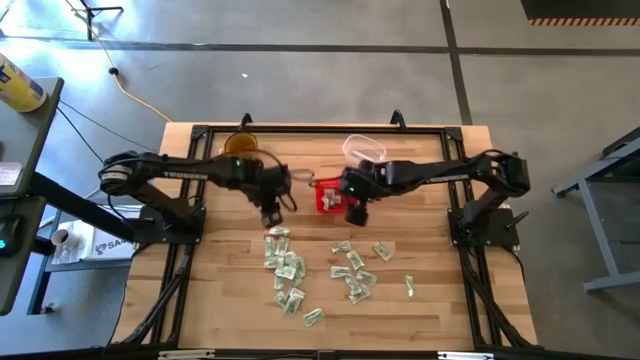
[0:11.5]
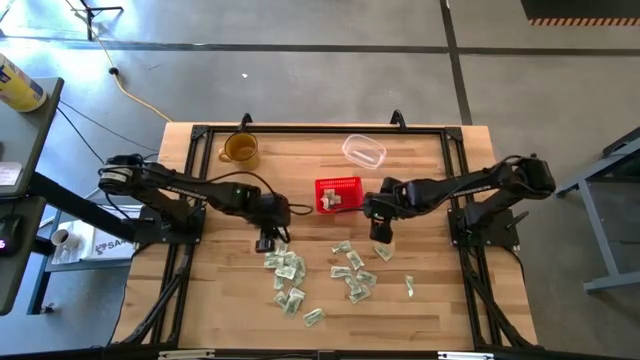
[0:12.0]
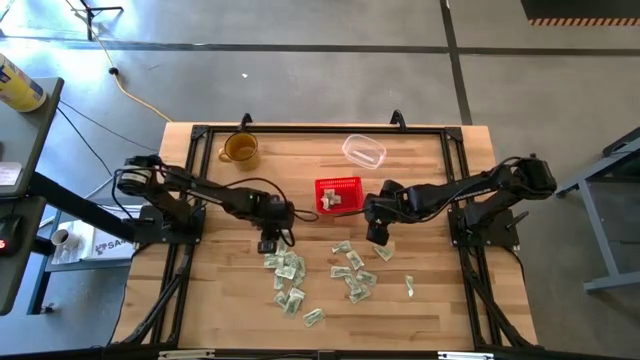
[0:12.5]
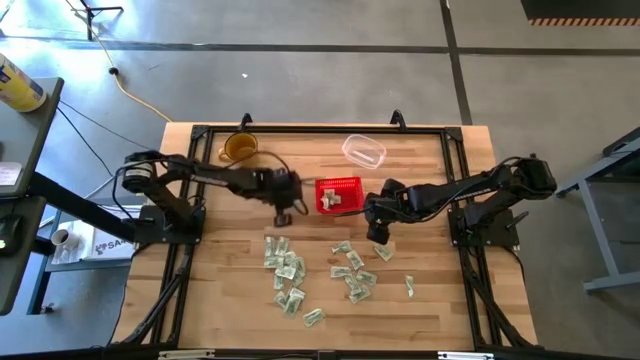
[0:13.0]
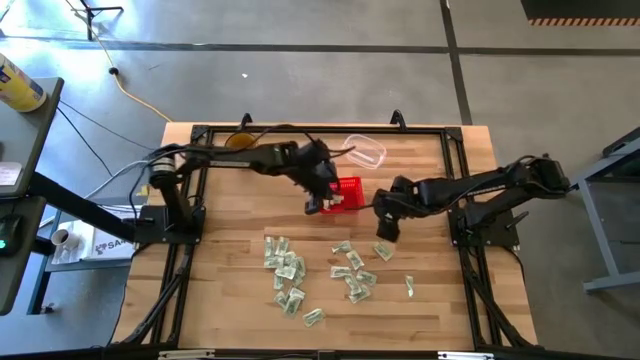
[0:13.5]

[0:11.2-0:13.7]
Task: Pick and place items into bin
Put the white packet into the red basket

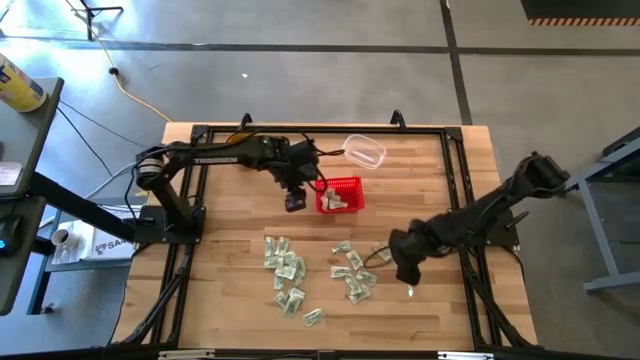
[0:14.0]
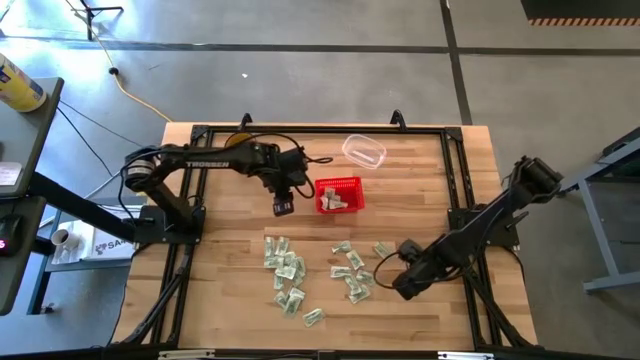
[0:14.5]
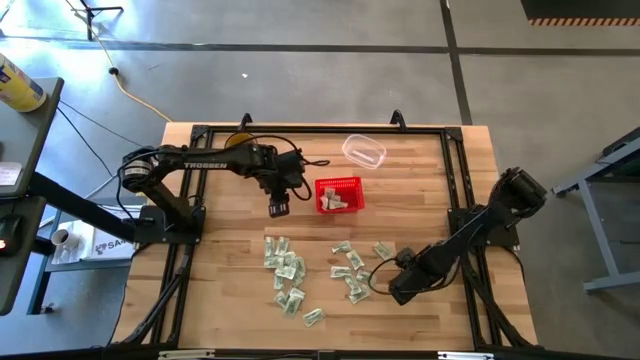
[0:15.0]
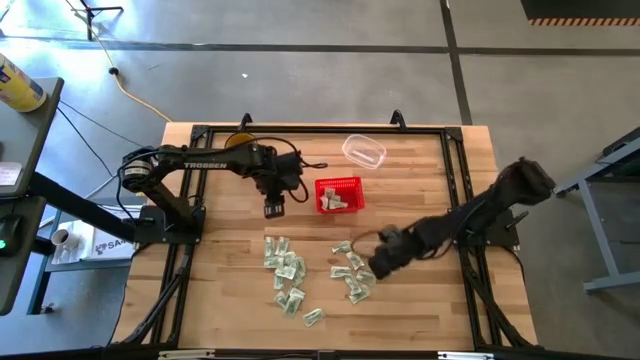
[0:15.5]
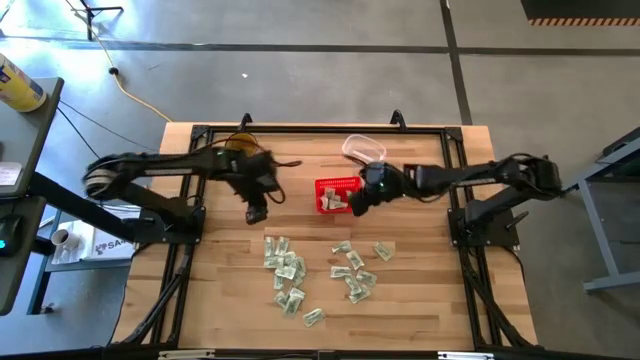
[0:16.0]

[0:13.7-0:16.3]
Put the white packet into the red basket

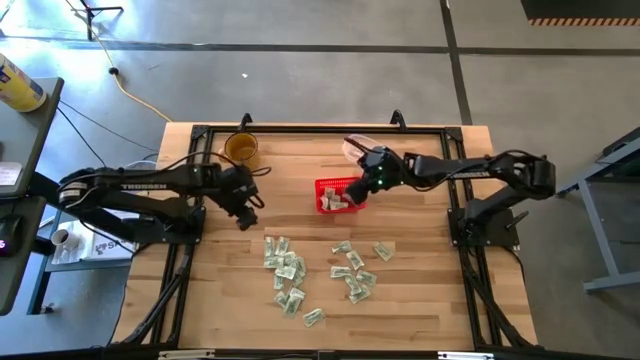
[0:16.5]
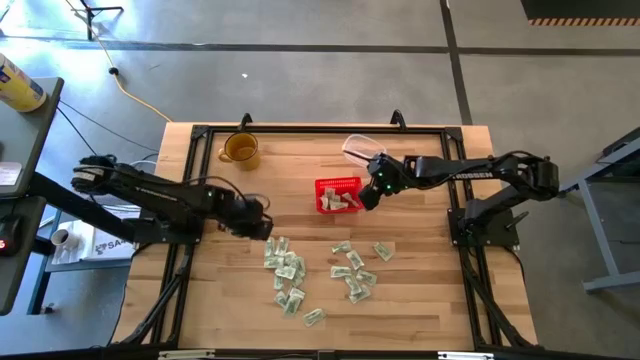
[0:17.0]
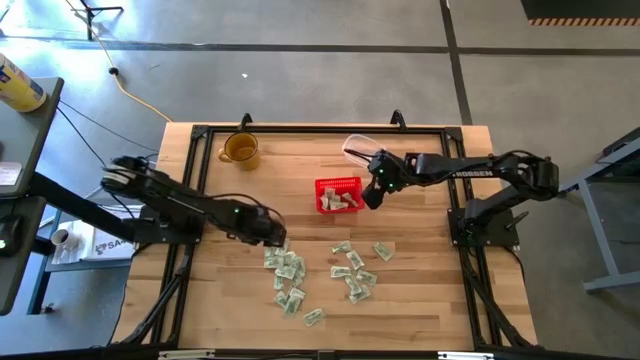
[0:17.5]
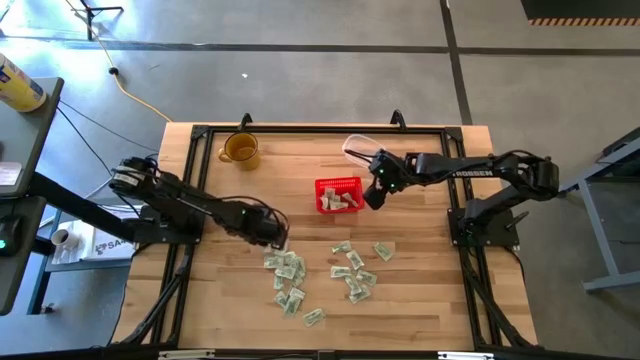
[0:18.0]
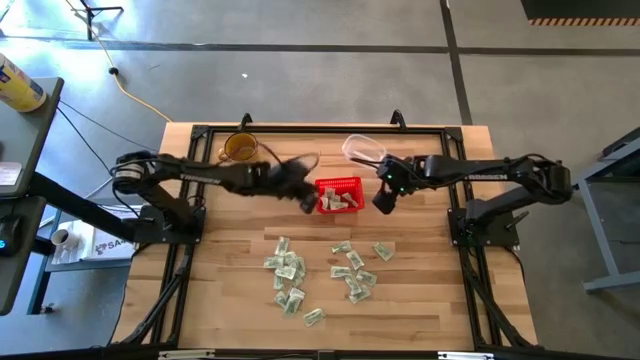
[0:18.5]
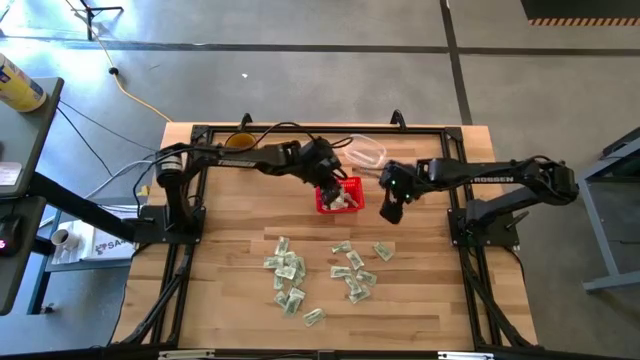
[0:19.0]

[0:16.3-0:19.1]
Put the white packet into the red basket

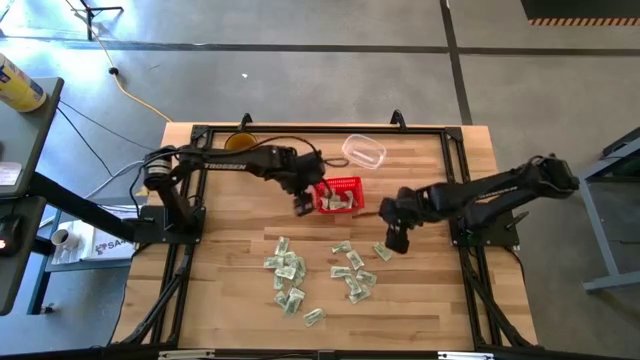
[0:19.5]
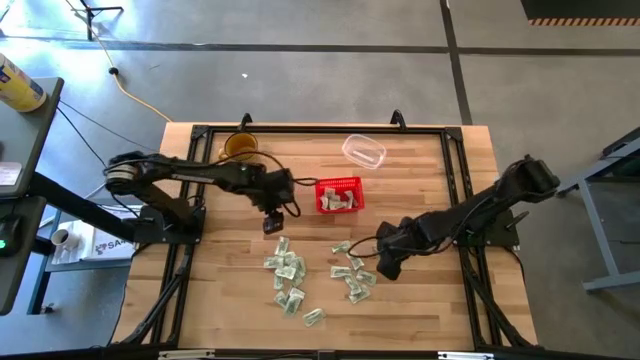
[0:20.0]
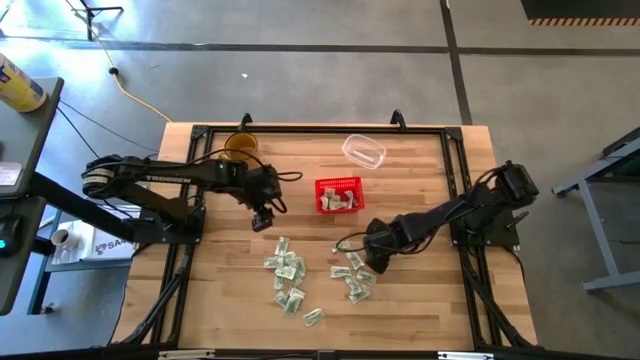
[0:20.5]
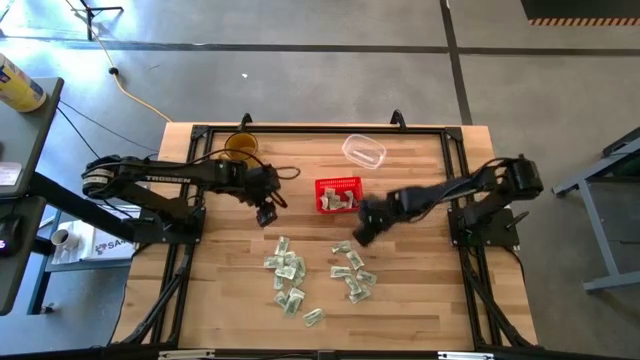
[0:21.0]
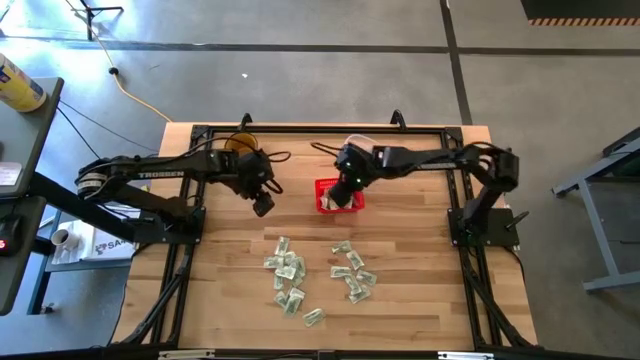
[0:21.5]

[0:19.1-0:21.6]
Put the white packet into the red basket

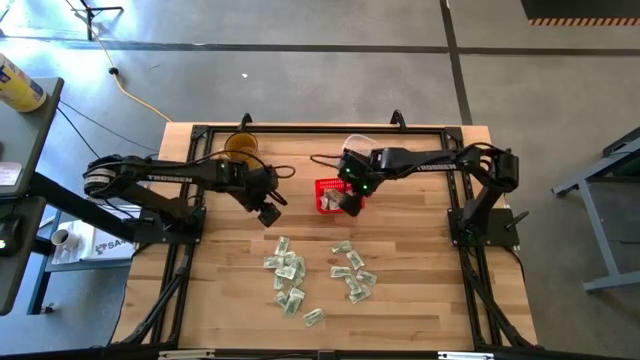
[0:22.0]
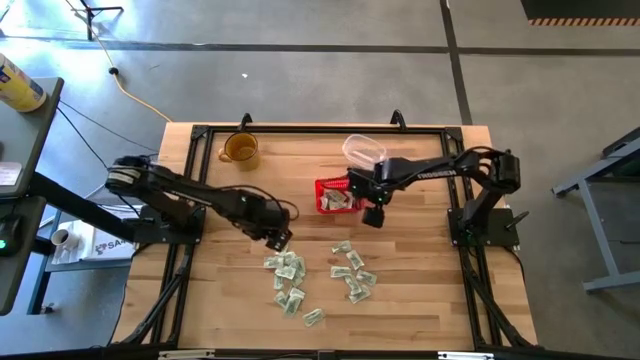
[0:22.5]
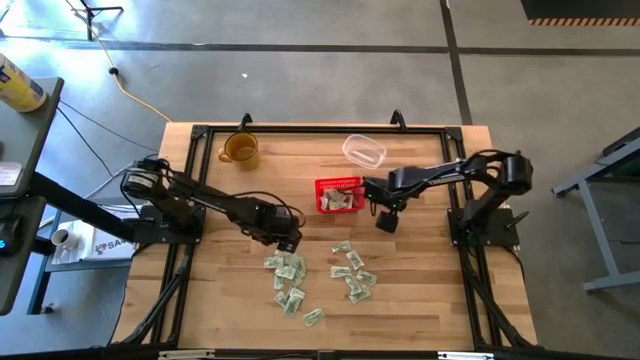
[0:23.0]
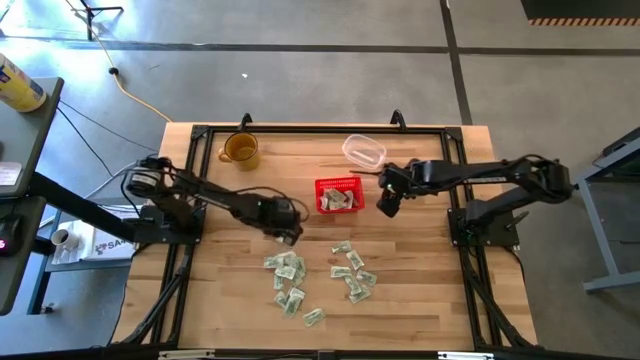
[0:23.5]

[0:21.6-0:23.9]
Put the white packet into the red basket

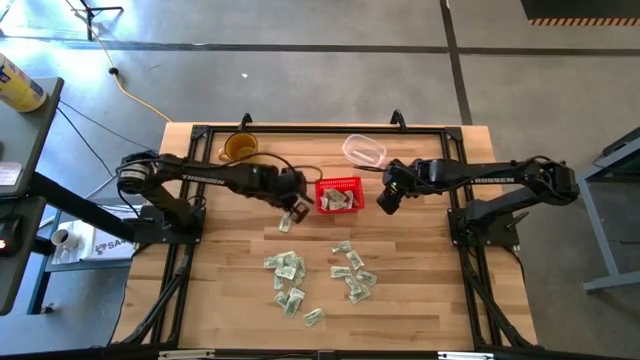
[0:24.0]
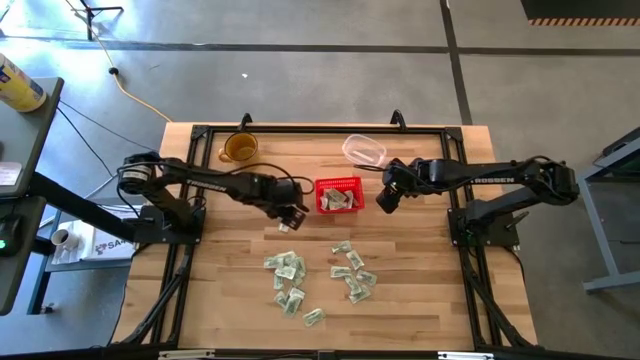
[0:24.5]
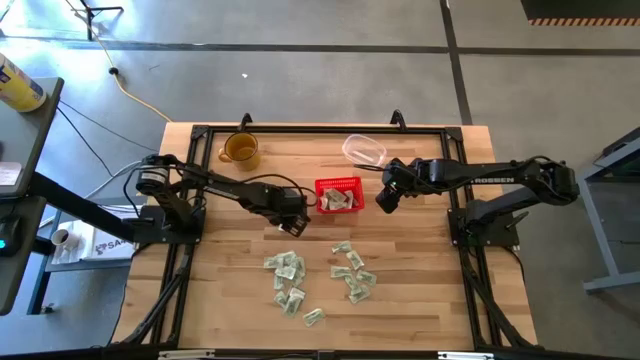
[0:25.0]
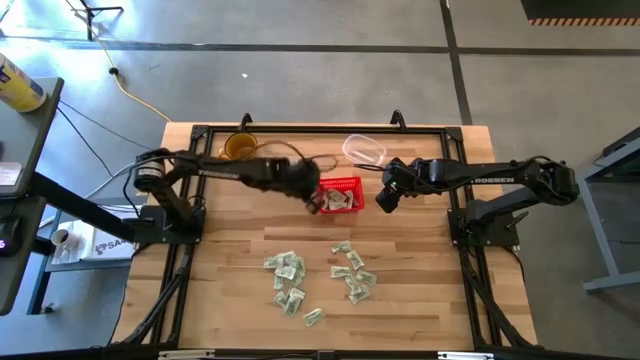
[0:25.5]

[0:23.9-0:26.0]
Put the white packet into the red basket

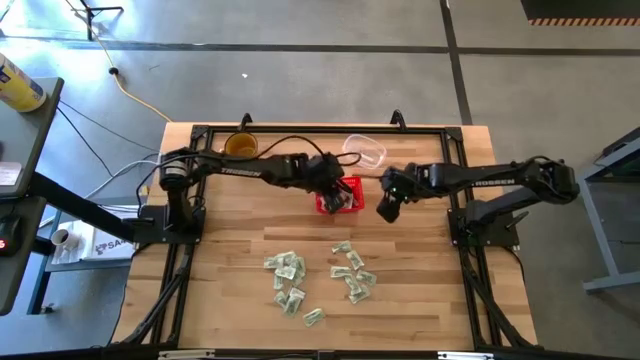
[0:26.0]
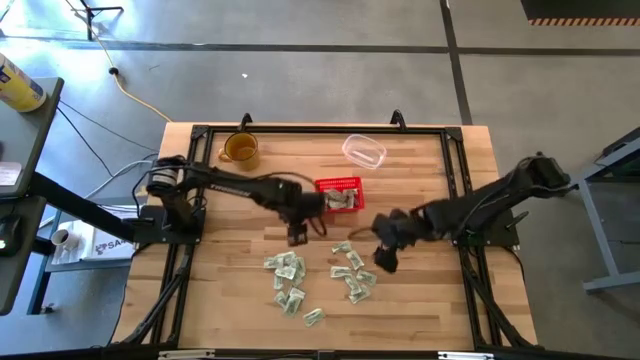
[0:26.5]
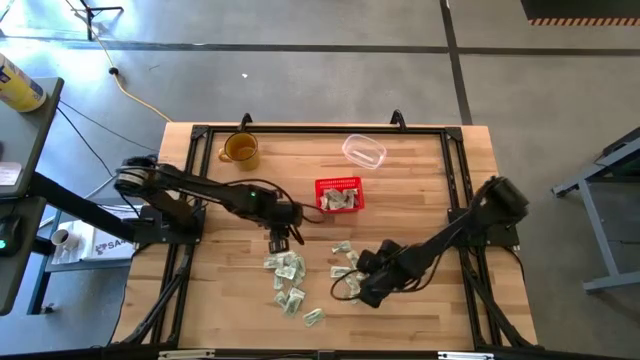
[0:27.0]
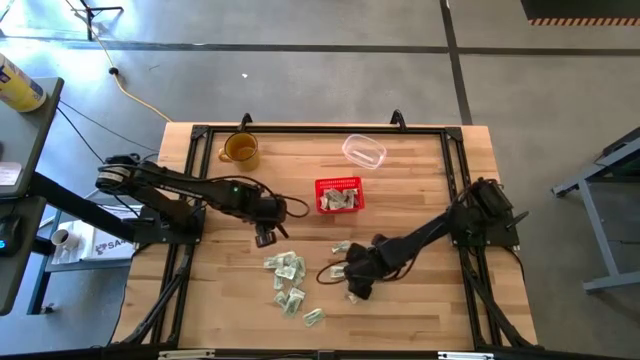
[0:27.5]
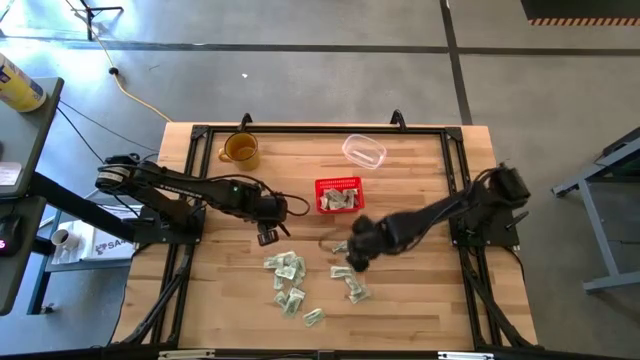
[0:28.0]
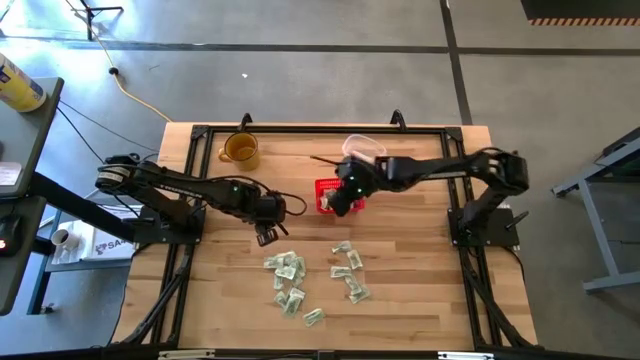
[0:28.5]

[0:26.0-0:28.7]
Put the white packet into the red basket

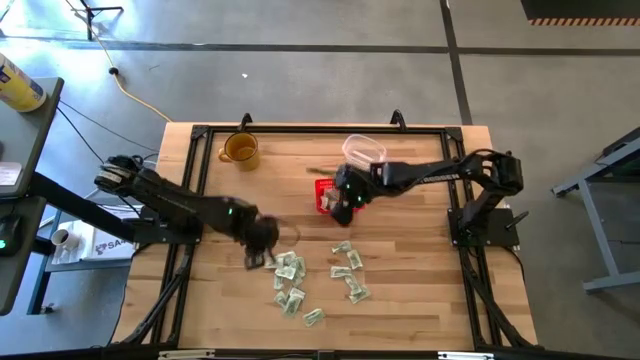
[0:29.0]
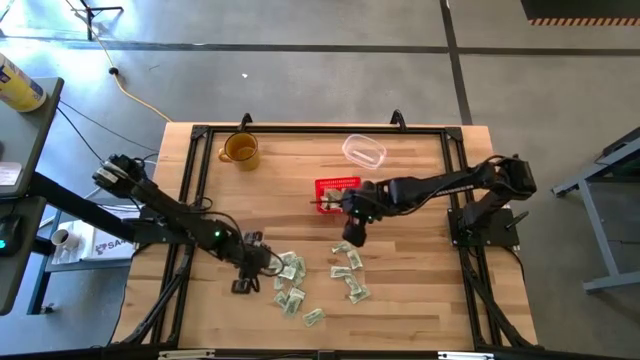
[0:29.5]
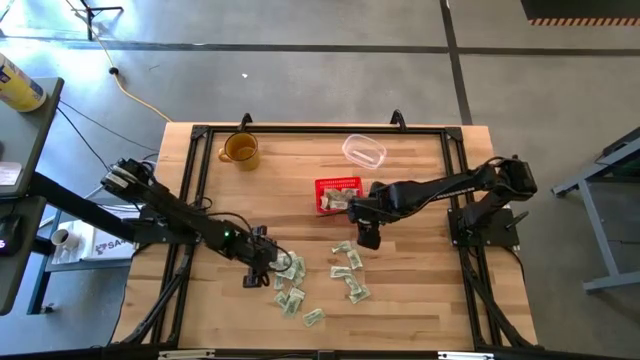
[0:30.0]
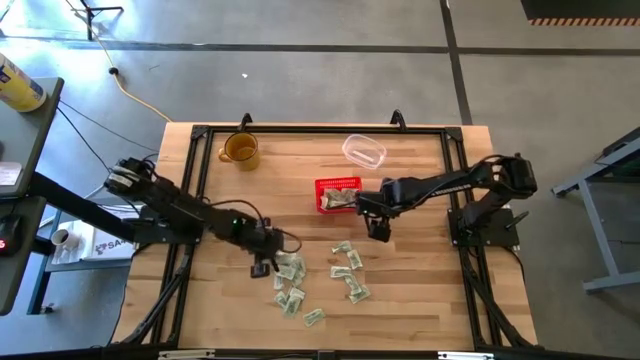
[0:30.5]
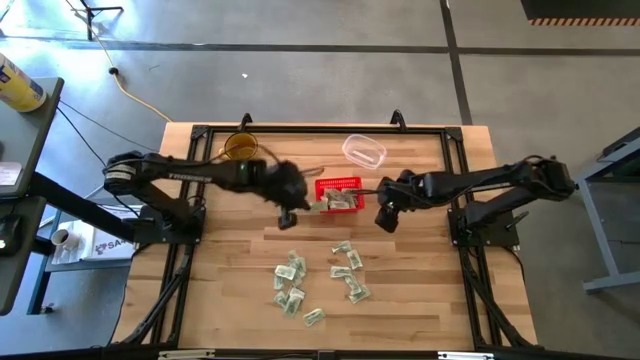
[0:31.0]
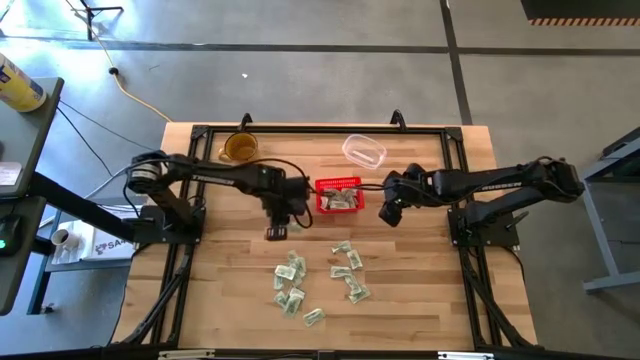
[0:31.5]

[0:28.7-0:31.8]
Put the white packet into the red basket

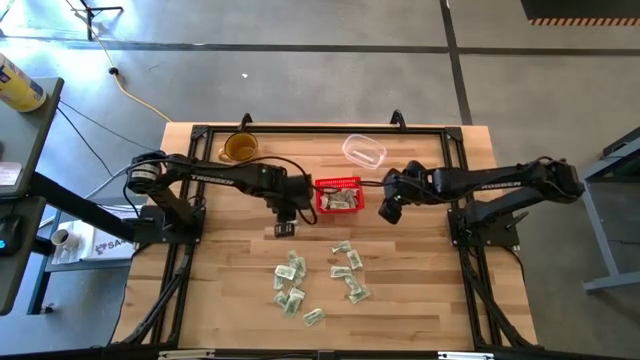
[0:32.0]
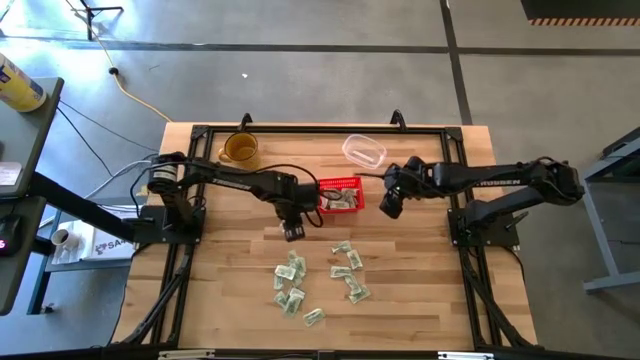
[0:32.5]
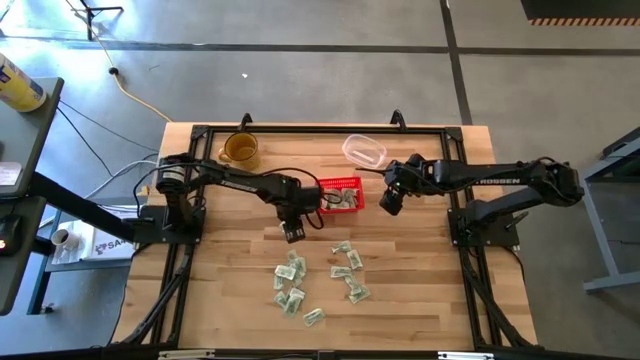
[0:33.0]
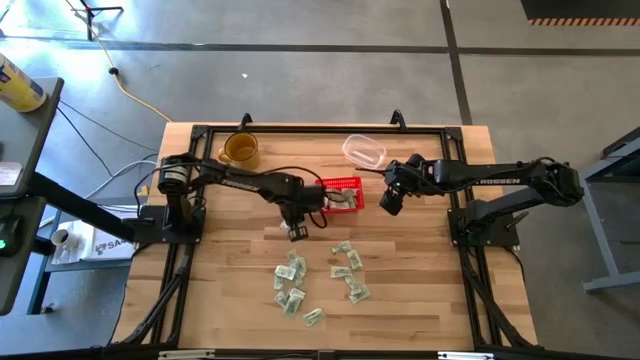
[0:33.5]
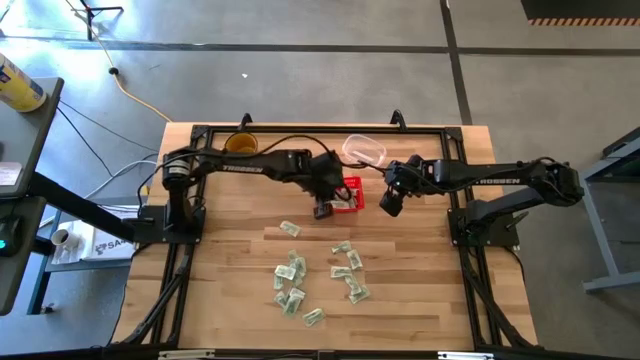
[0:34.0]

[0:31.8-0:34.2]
Put the white packet into the red basket
